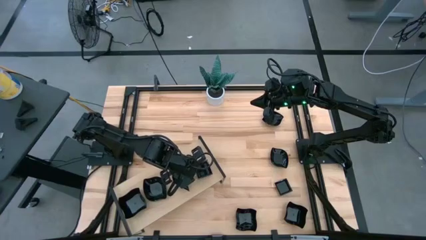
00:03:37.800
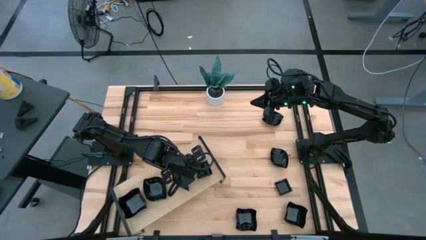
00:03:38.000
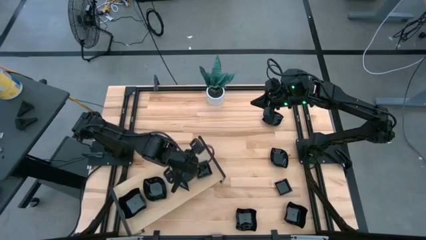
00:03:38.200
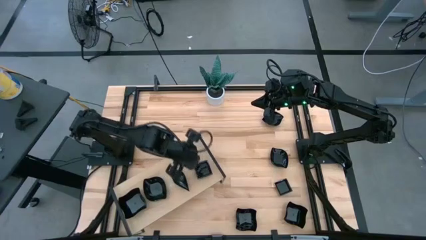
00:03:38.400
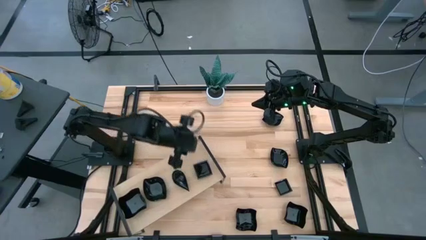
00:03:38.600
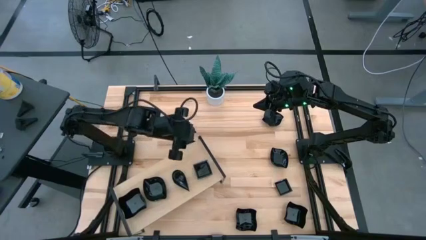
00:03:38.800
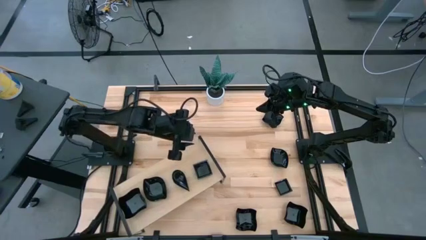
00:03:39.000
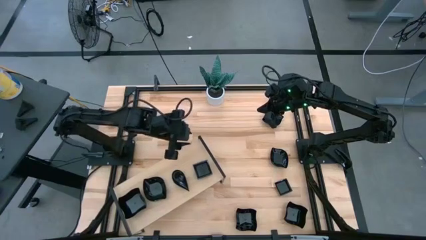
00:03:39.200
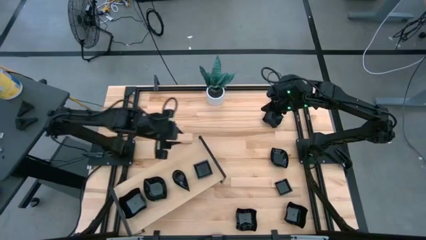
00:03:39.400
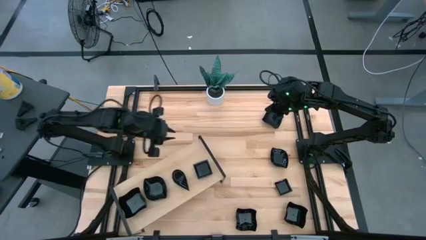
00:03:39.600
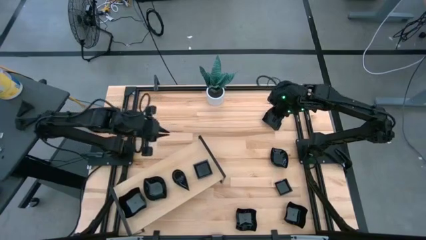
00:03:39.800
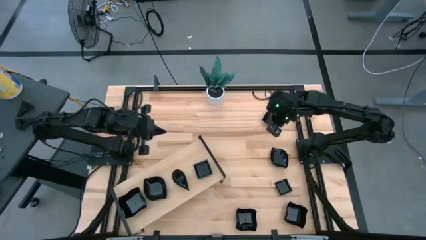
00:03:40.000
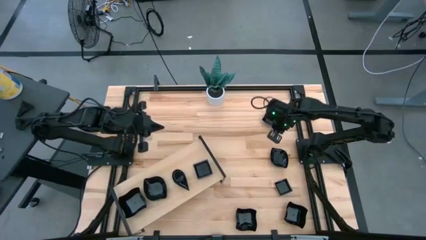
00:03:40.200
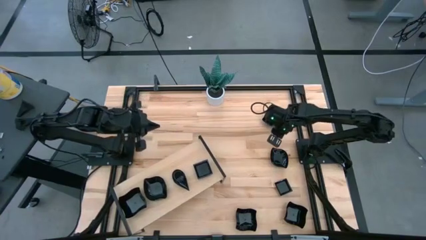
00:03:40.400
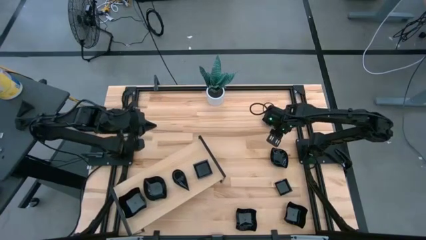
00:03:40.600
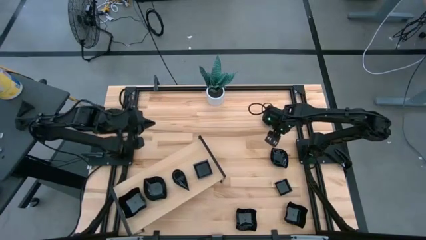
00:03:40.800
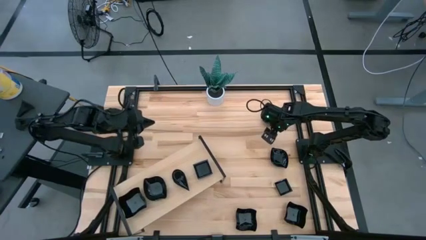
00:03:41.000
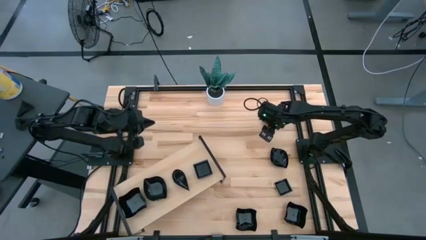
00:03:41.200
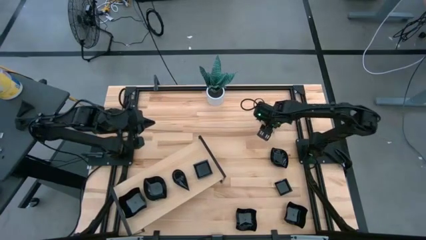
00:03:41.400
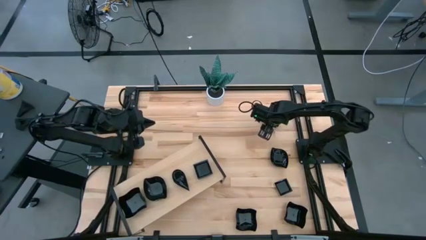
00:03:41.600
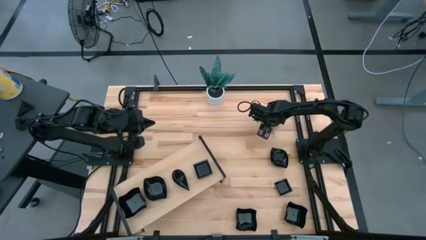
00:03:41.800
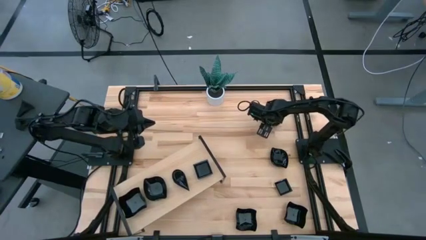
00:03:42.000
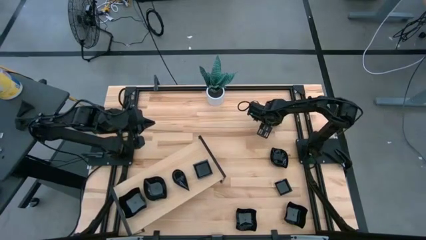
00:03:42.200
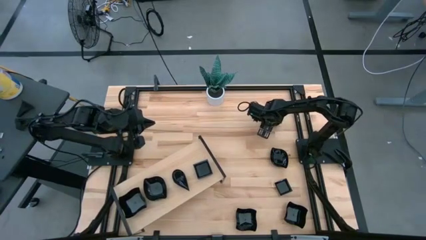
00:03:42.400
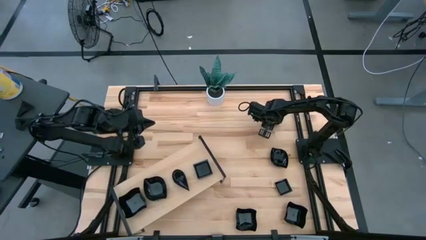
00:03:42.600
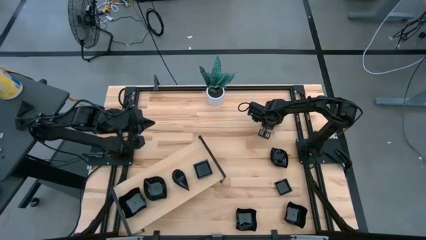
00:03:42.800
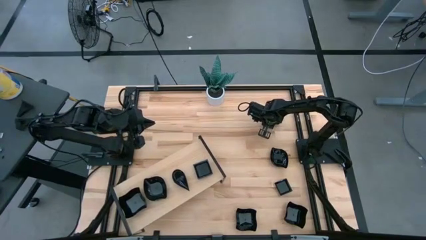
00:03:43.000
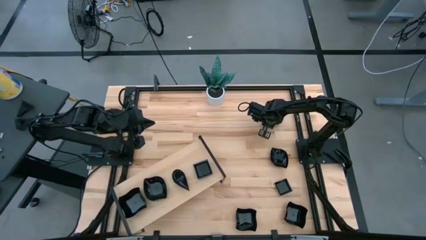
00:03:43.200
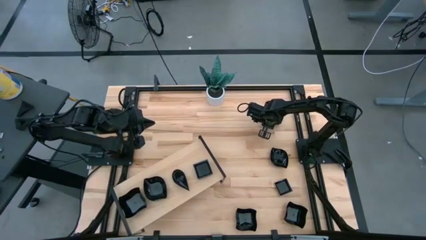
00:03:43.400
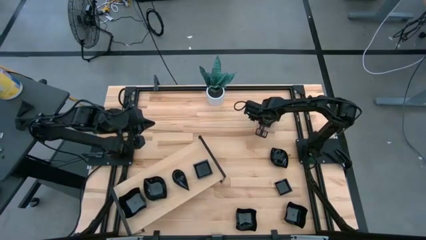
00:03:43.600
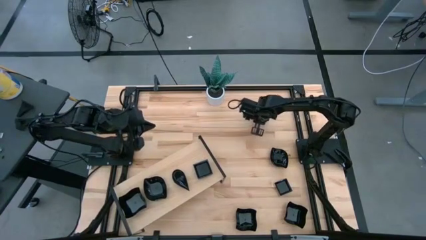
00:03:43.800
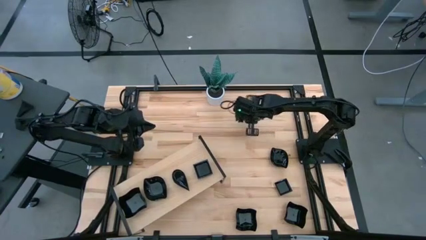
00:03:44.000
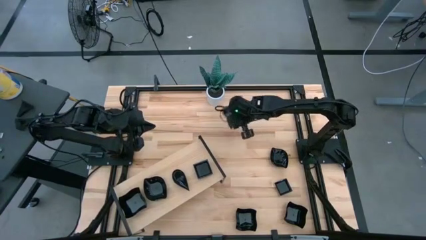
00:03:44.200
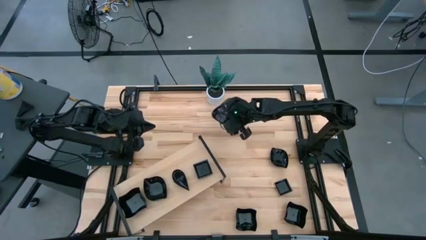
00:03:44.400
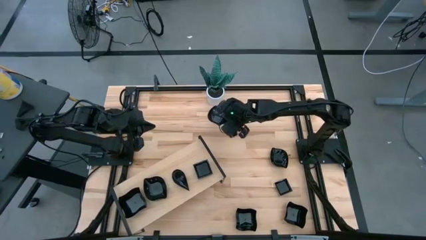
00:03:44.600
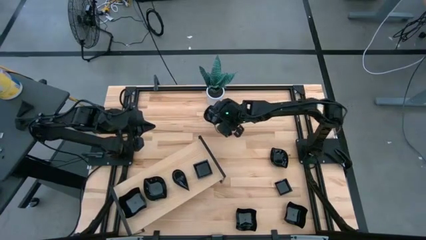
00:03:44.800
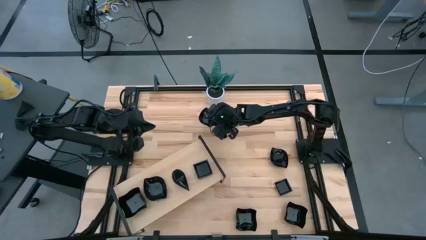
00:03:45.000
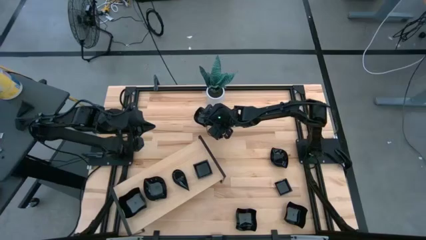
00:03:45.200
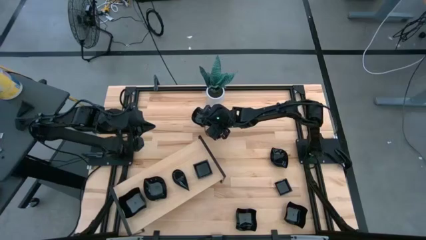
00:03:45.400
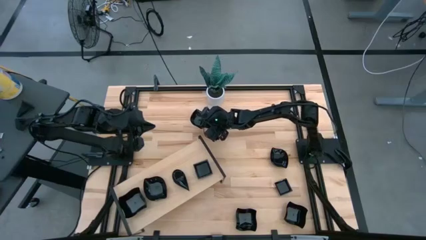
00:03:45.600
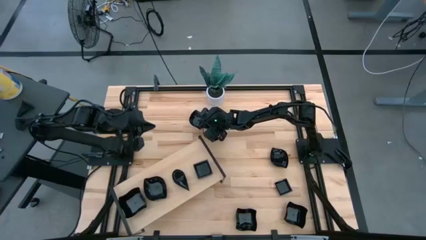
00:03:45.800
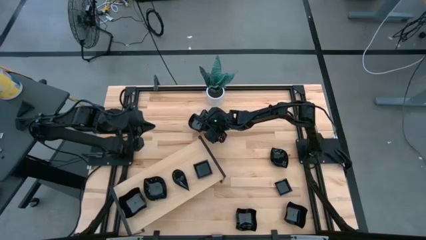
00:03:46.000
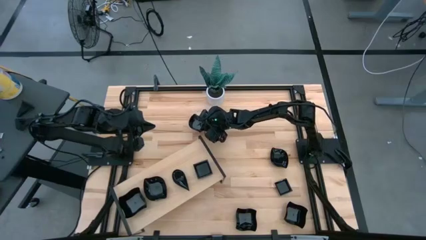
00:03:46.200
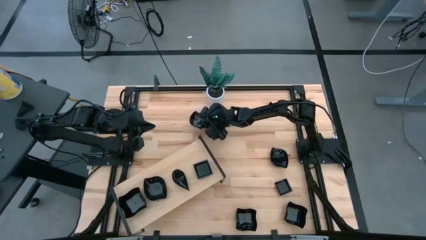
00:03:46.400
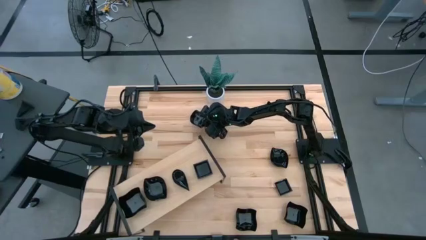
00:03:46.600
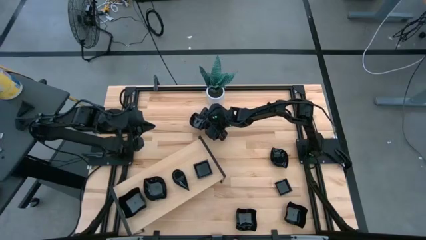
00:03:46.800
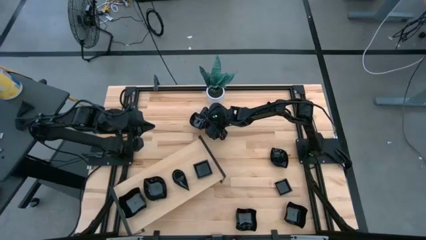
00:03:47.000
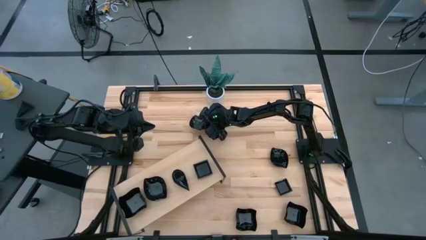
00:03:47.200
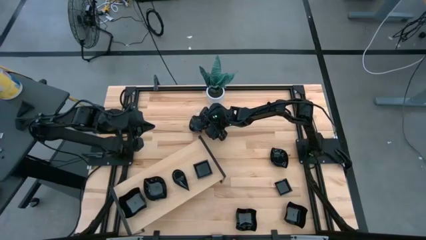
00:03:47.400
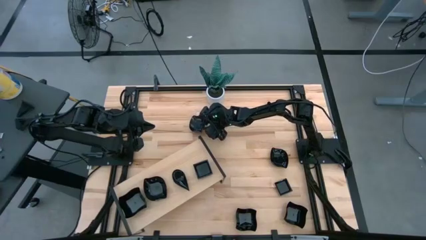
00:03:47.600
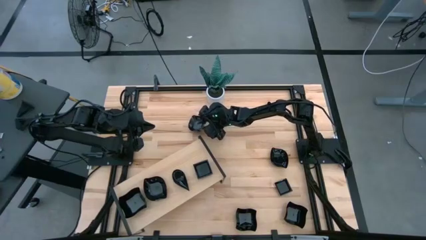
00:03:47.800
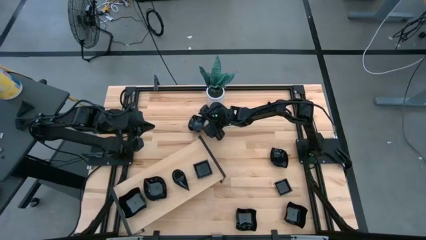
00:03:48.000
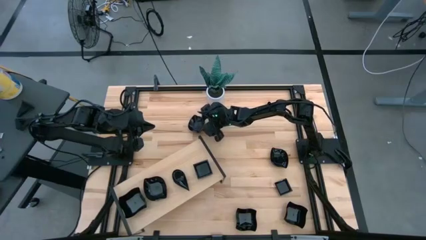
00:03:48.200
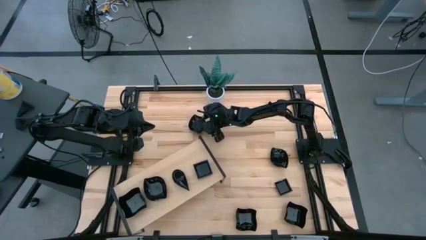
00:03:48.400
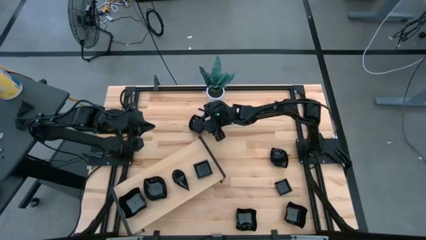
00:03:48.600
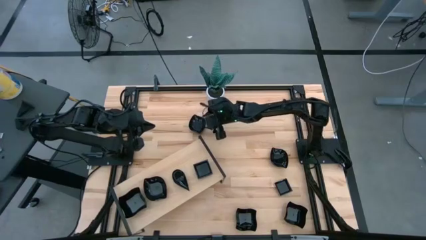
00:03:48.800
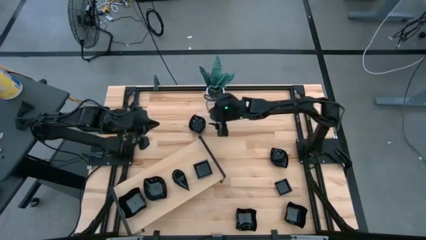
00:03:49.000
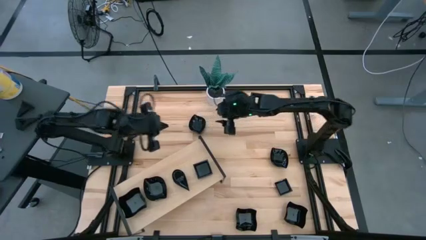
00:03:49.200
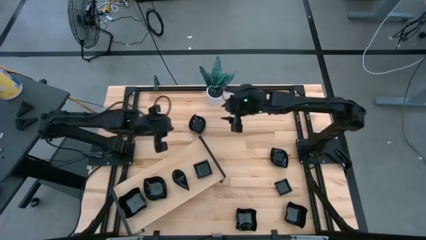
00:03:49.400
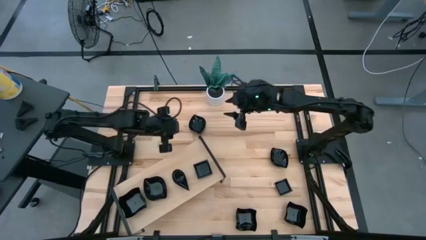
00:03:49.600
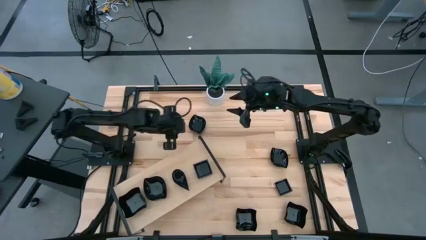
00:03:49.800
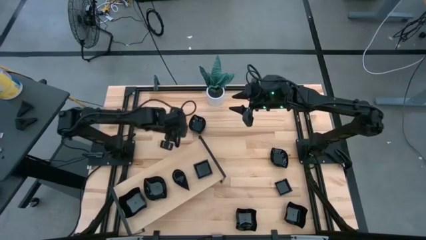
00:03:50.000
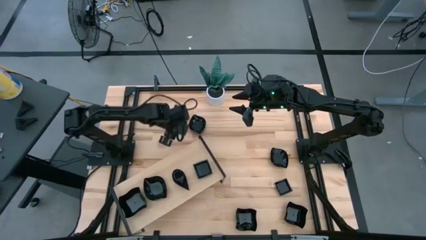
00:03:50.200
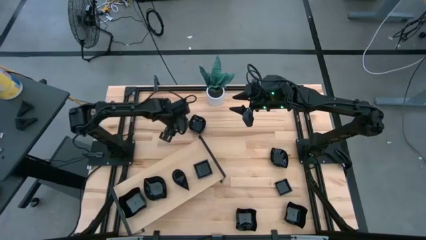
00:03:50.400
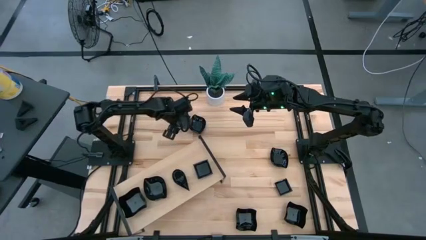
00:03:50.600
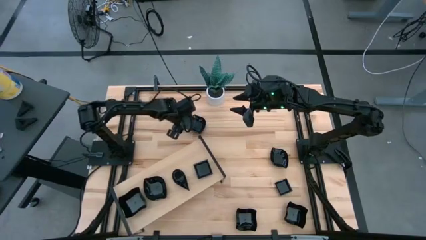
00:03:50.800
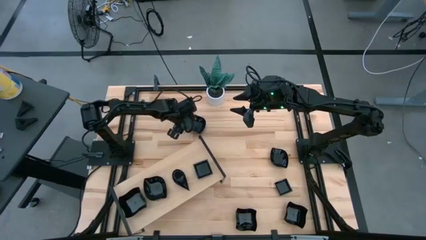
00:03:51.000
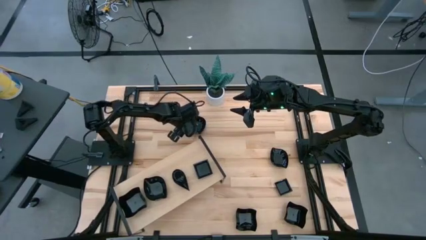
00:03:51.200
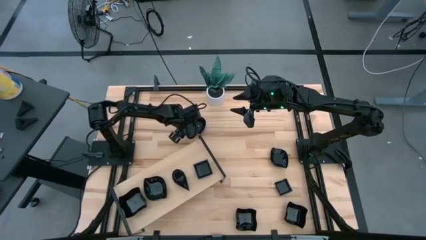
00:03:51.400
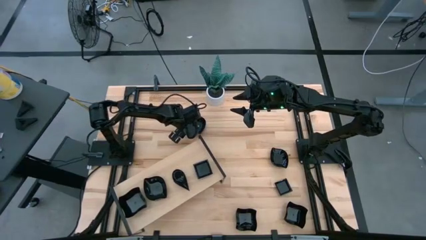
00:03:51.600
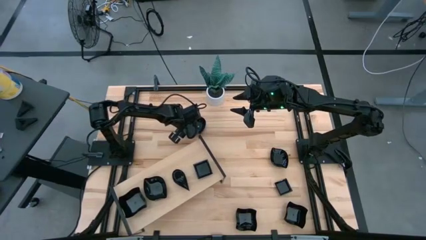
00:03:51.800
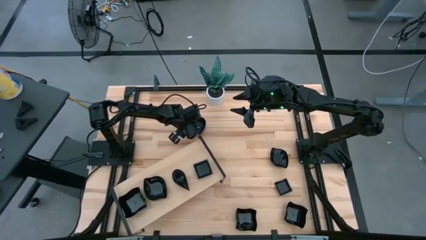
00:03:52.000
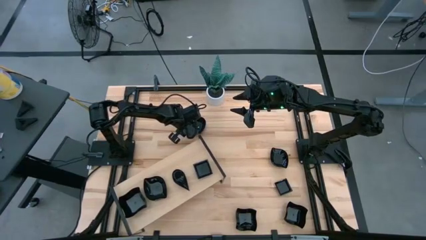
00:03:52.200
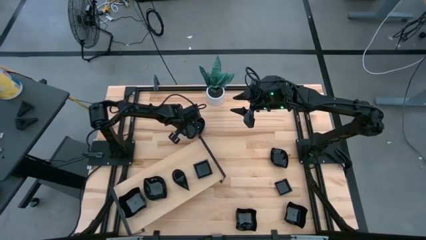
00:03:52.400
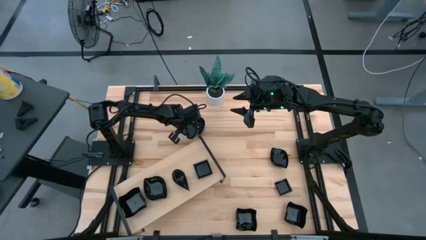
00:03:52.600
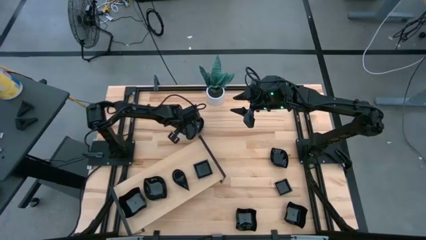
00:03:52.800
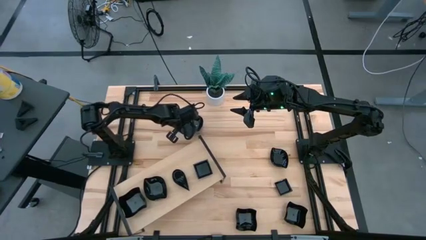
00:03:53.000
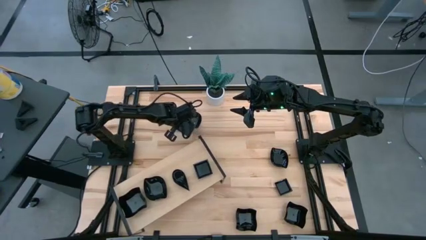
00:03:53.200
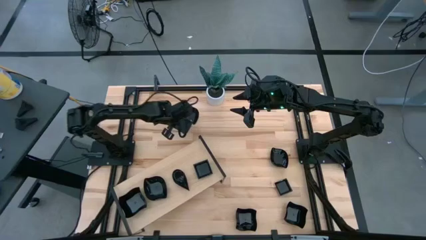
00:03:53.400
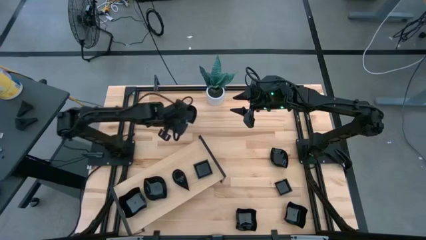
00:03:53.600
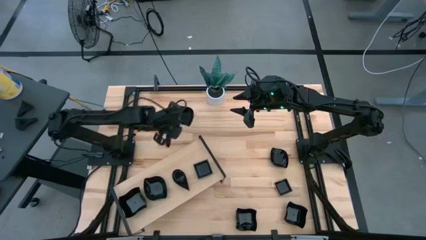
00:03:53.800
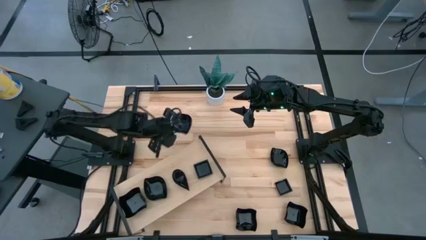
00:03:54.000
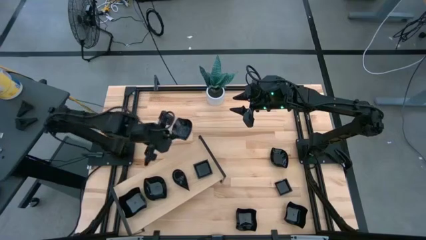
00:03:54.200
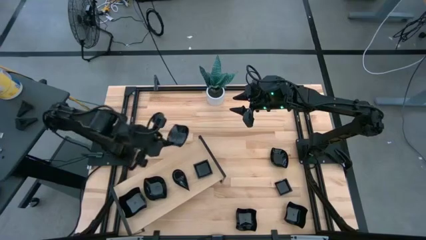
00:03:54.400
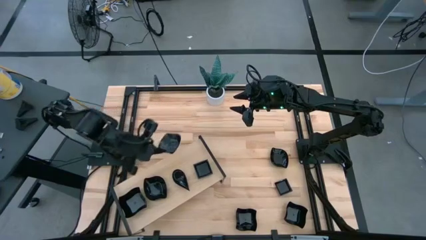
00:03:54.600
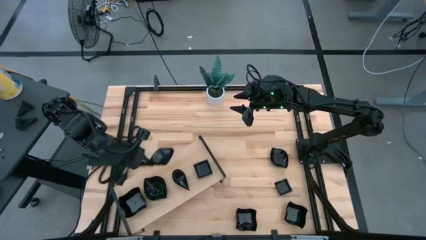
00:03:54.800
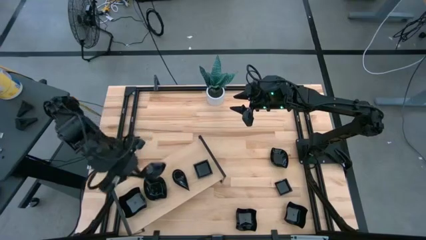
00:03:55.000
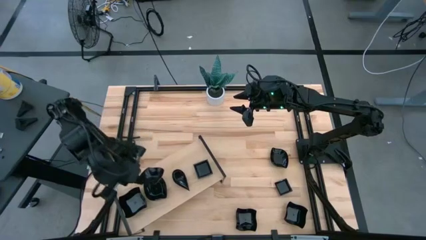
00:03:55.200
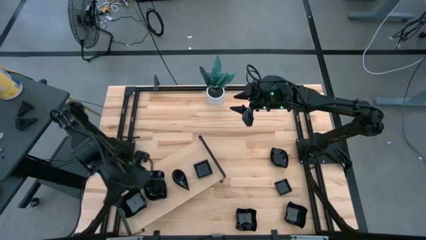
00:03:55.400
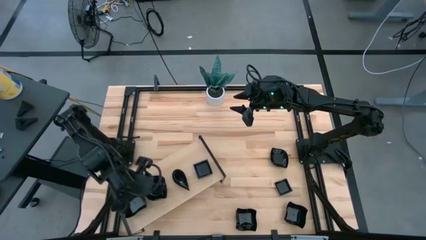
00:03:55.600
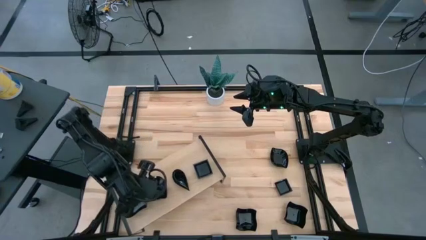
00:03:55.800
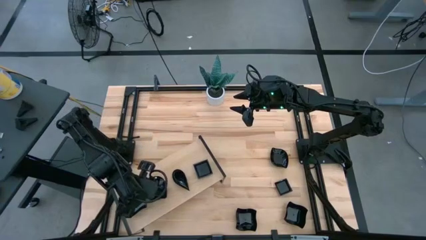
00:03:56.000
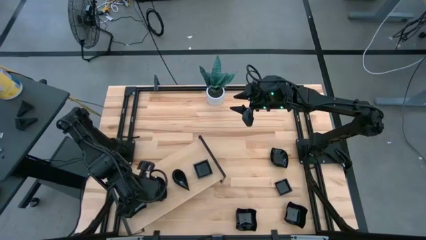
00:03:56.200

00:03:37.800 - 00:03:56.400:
Task: Pick & Place Mini shaped plates
Stack the black leaf shaped on top of the black leaf shaped on the shelf
